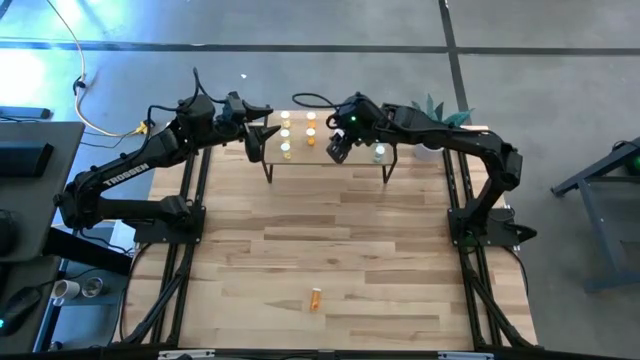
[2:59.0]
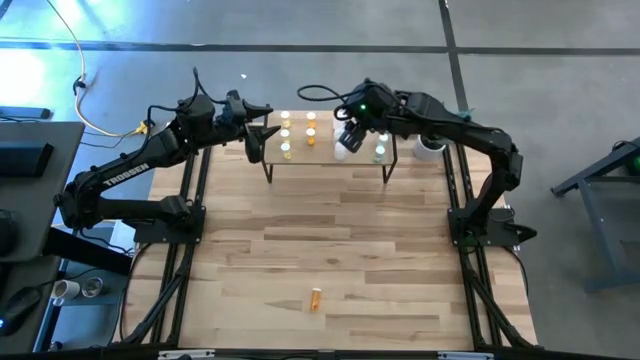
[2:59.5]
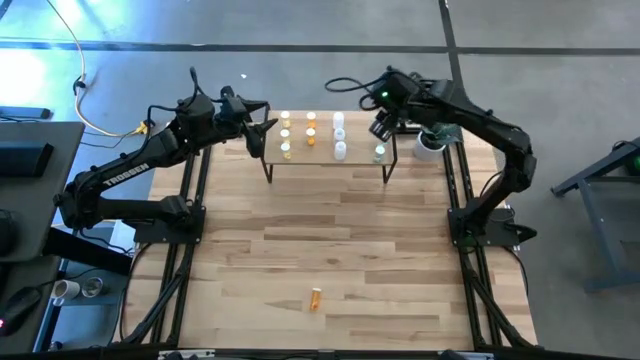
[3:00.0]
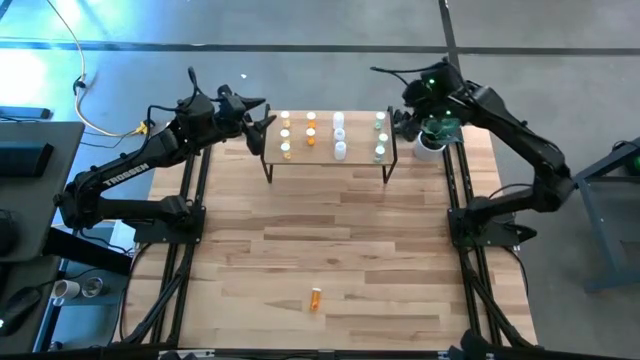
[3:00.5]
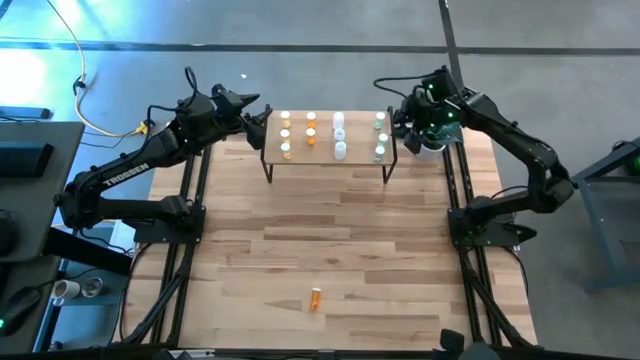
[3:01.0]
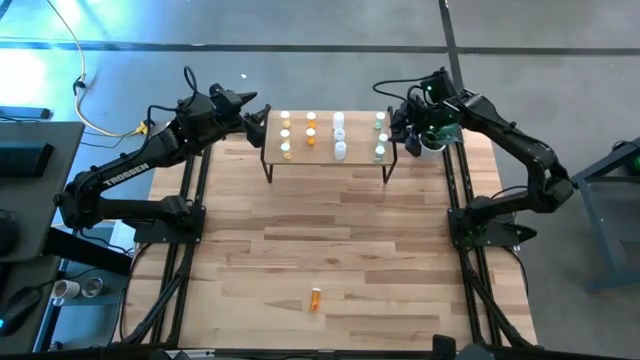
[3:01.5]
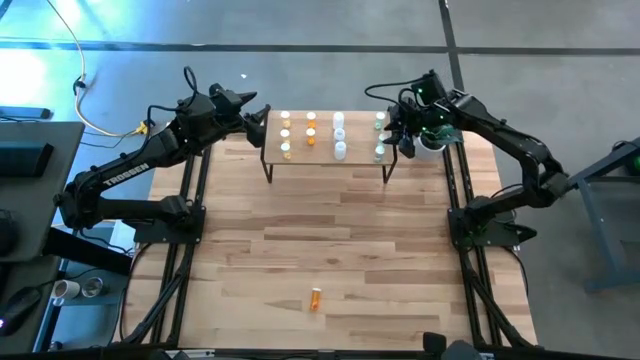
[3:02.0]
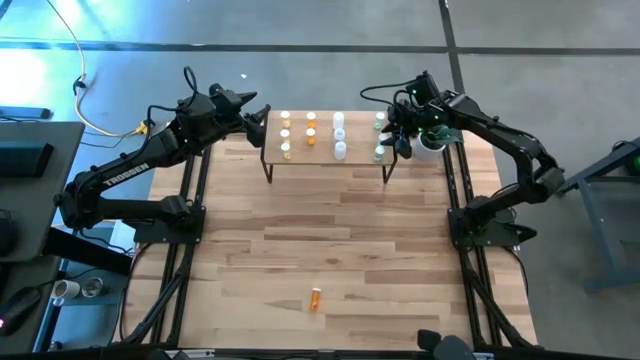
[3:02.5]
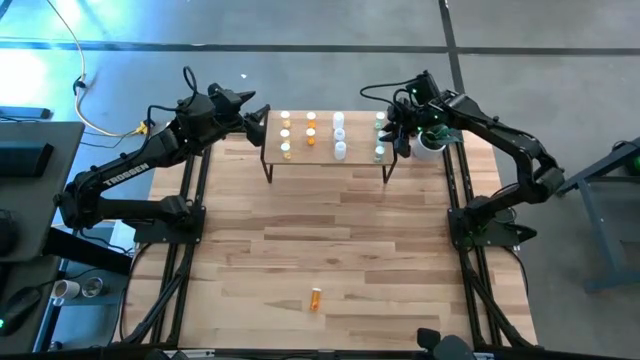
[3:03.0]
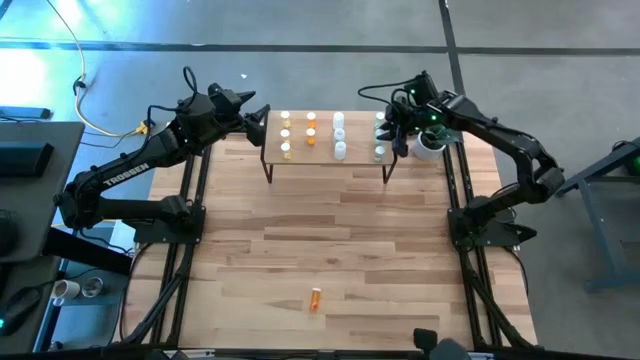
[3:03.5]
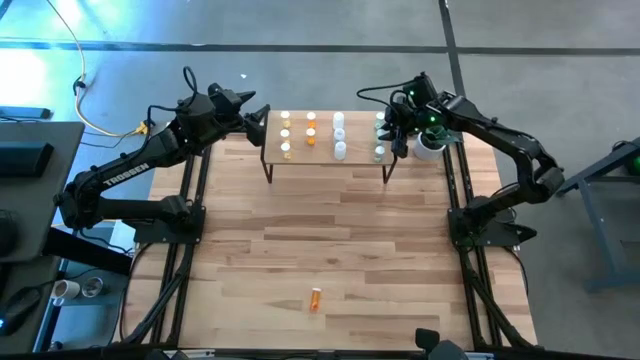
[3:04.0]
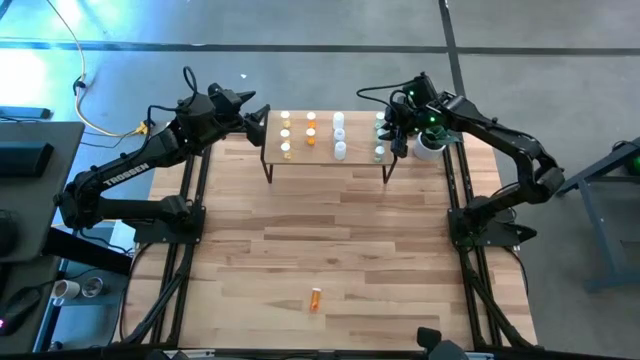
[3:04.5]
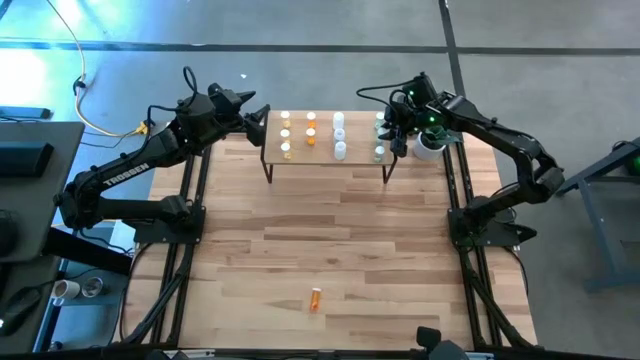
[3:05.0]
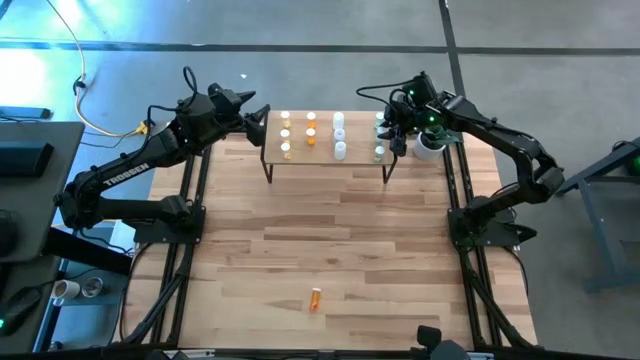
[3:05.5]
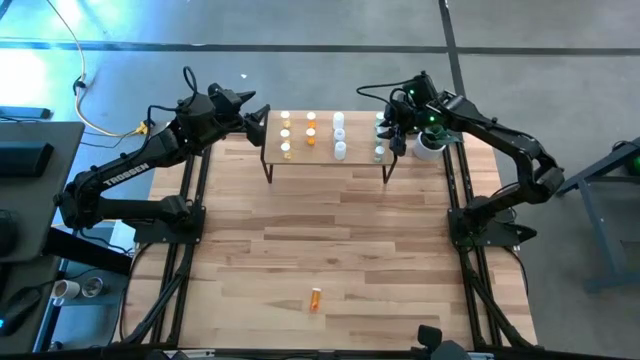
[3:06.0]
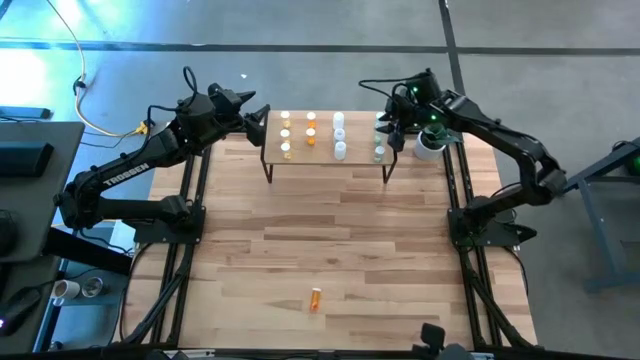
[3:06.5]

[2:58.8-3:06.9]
Task: Pick and place medicine bottles onto shelf by color
Adjust the blue pill bottle on the shelf

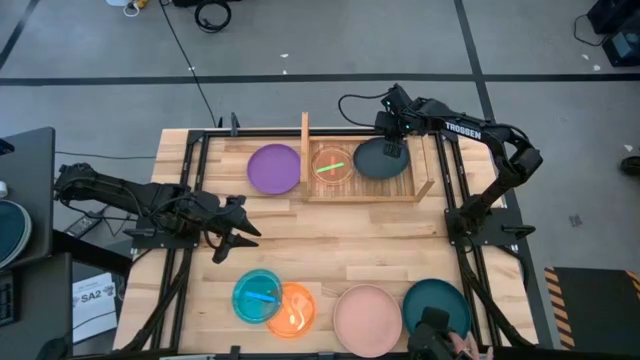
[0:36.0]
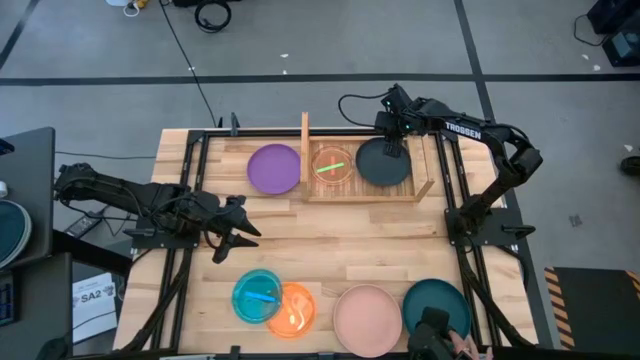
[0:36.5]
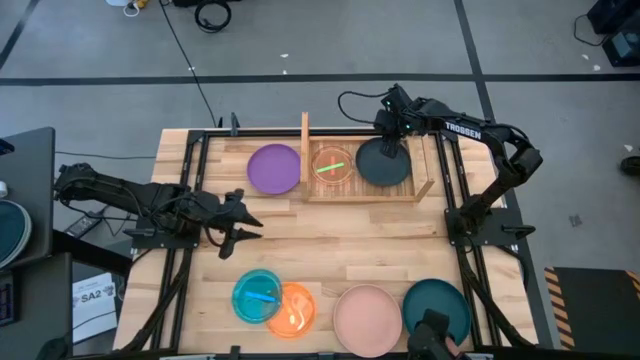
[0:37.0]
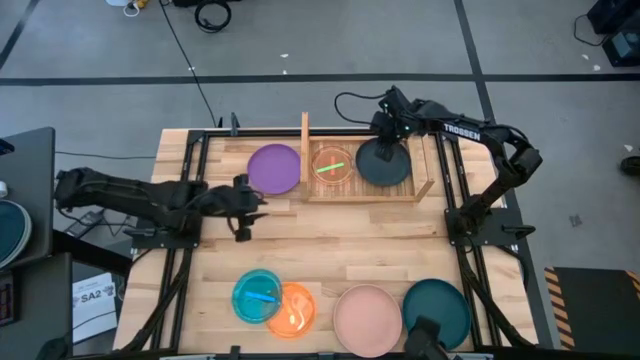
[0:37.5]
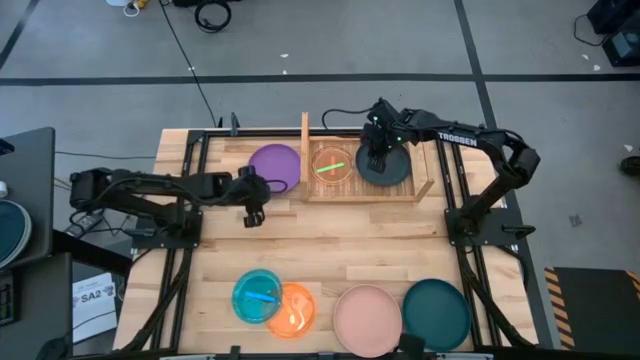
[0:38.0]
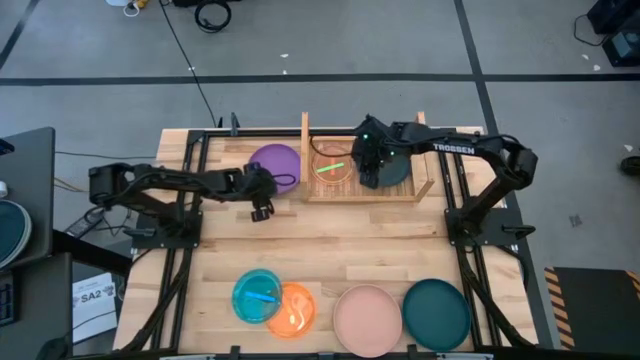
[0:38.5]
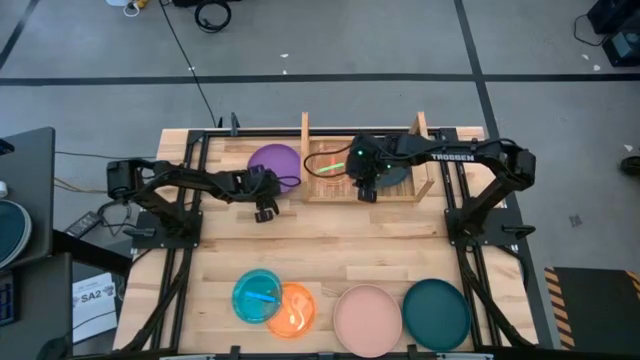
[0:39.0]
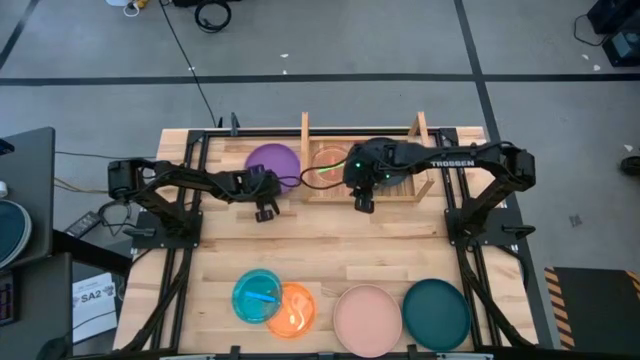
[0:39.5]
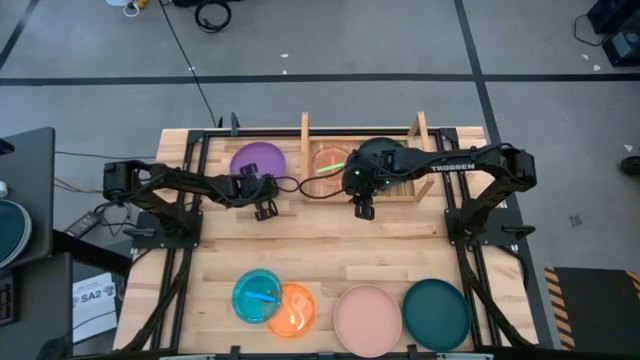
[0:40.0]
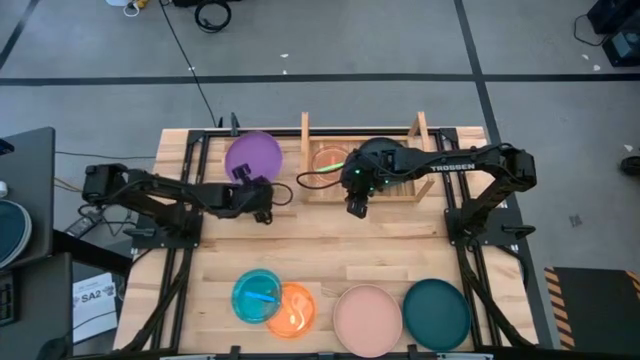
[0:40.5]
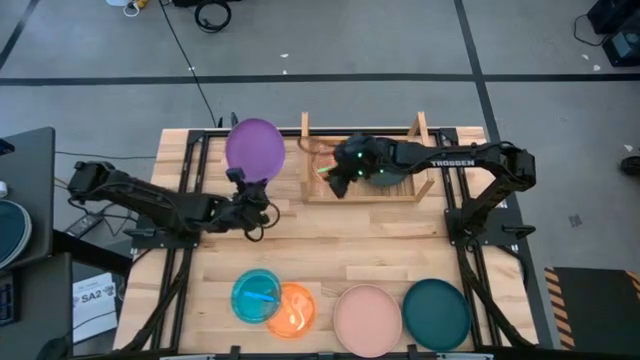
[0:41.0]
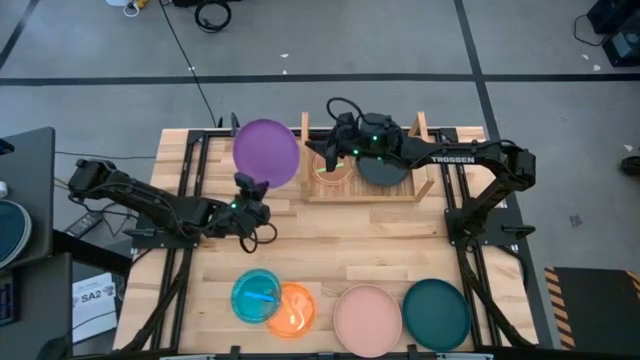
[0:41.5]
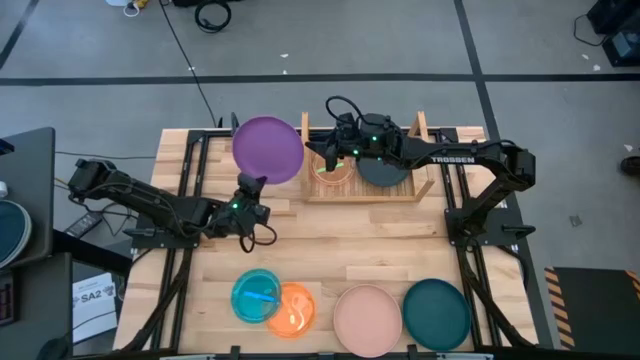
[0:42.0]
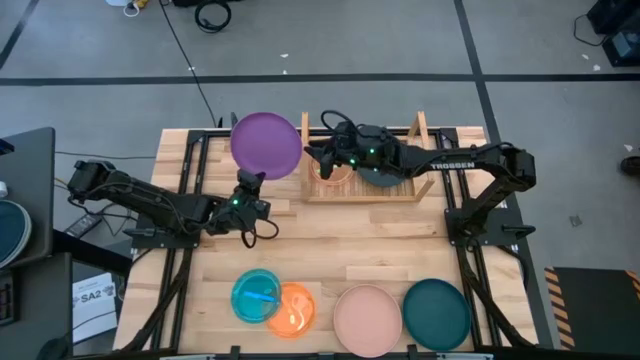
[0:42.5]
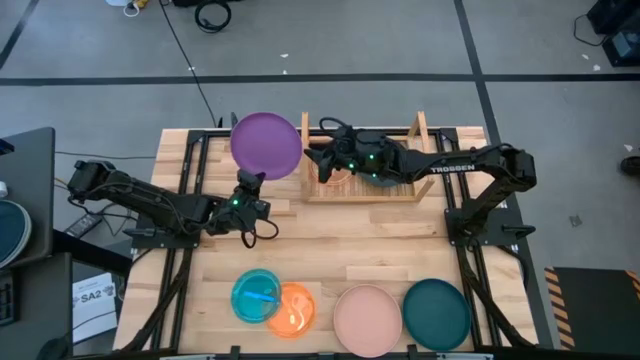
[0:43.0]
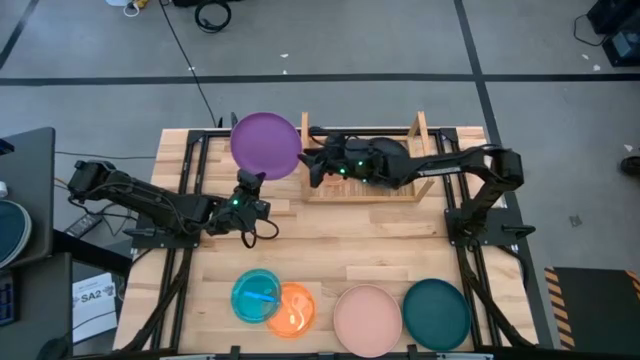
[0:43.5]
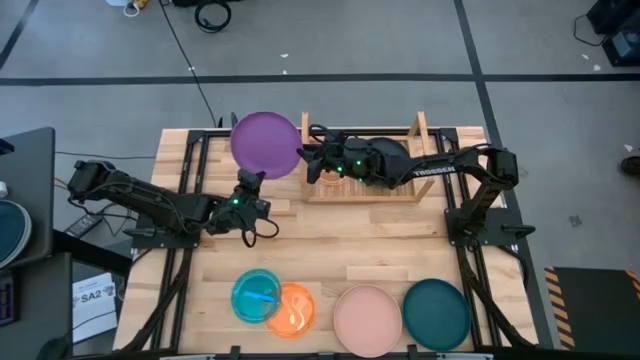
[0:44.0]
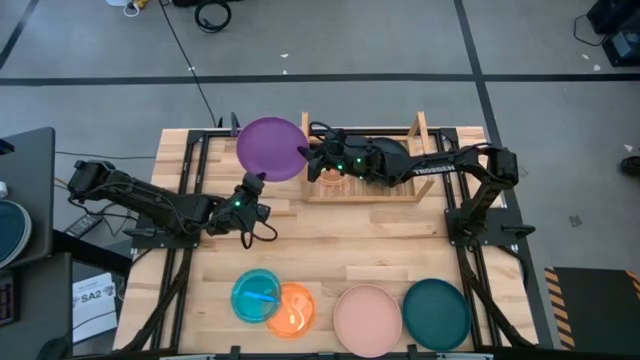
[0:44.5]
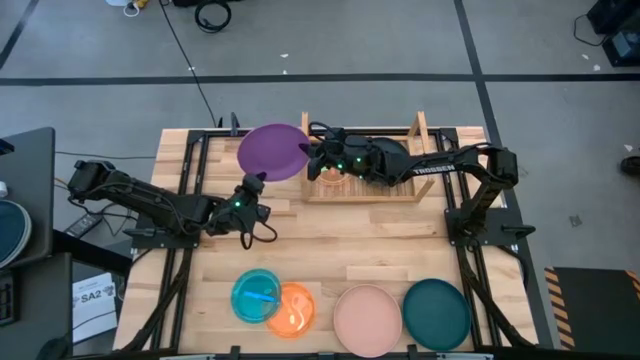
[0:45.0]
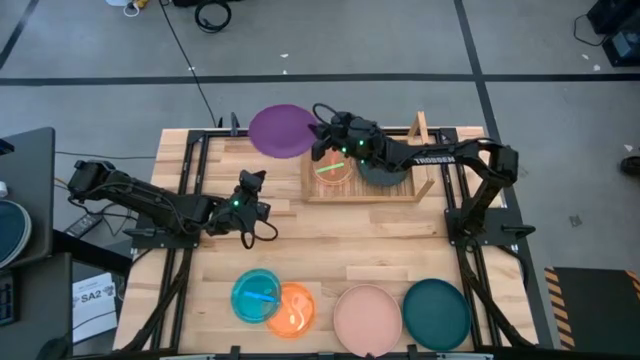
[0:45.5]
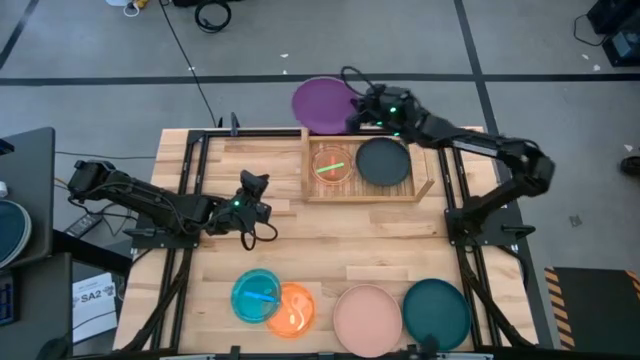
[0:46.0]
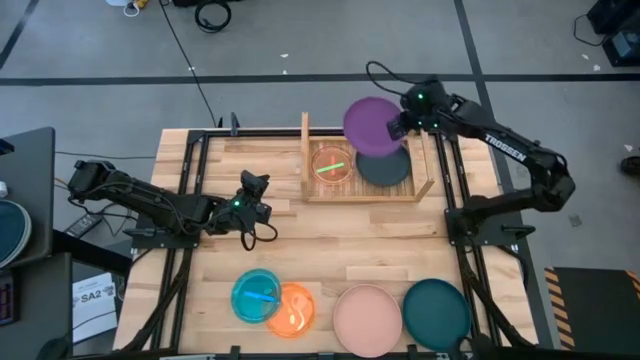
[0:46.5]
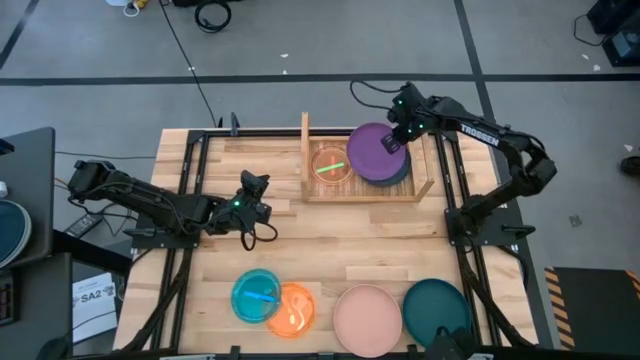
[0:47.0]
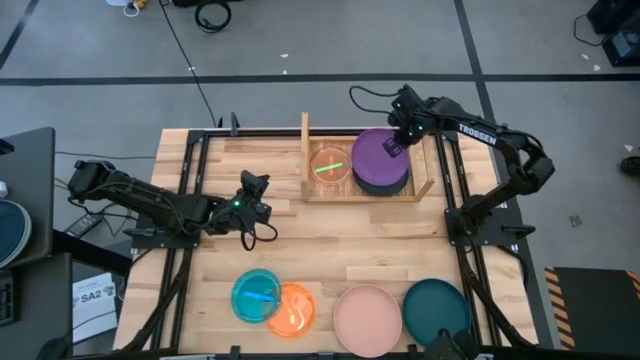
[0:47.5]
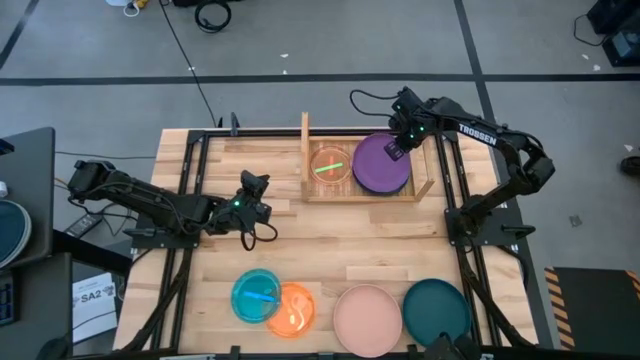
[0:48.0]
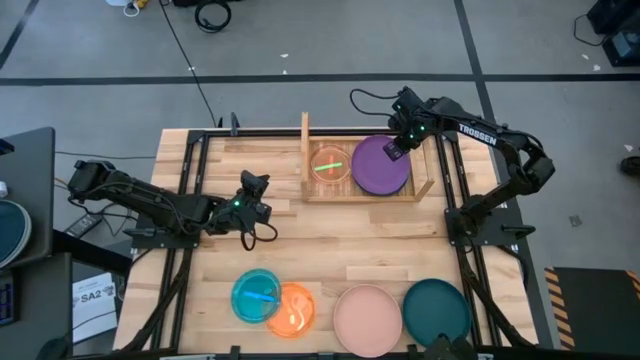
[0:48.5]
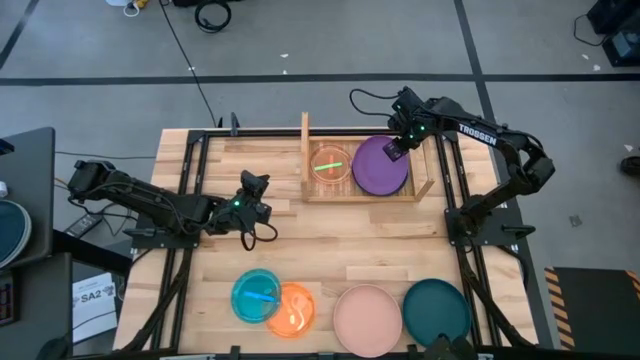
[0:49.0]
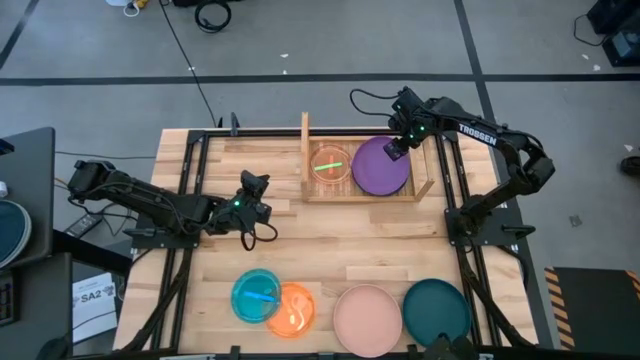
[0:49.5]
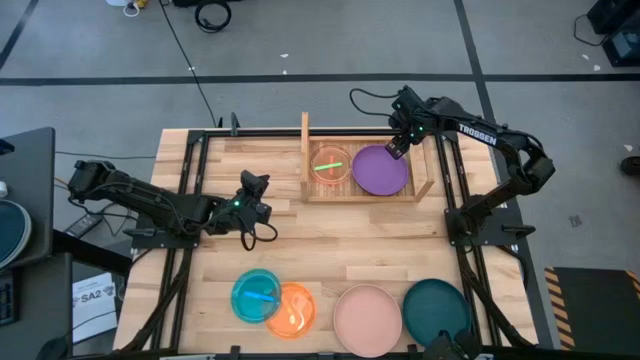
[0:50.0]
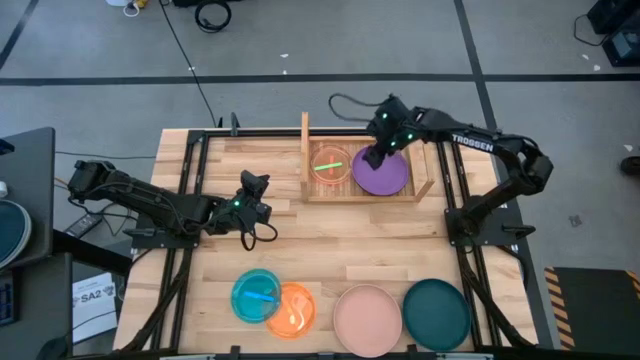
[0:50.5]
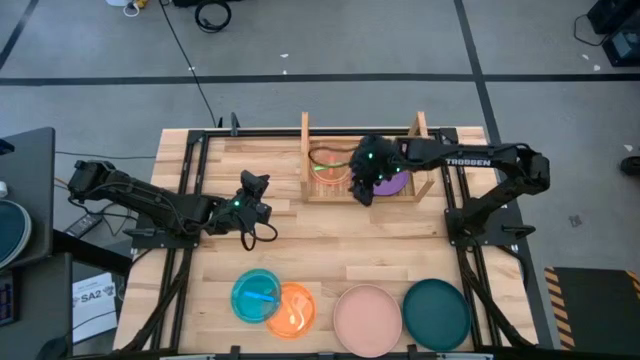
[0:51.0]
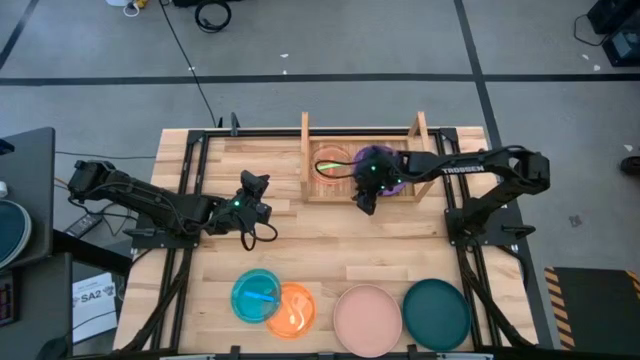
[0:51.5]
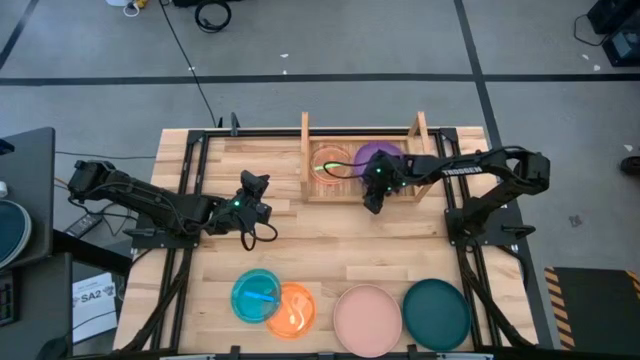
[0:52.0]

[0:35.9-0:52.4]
Task: Place and stack plates onto a shelf
Stack the large purple plate on top of the large black plate on the shelf
